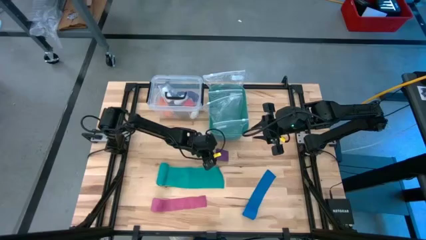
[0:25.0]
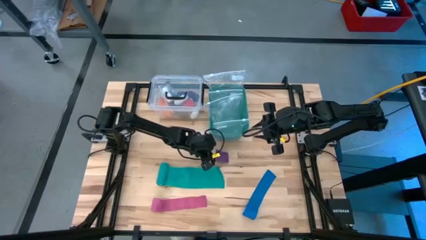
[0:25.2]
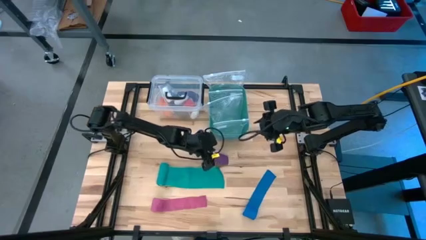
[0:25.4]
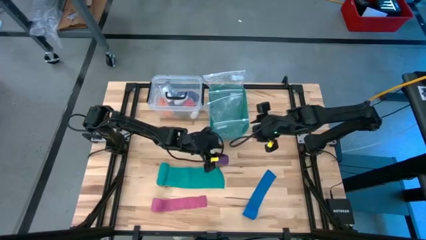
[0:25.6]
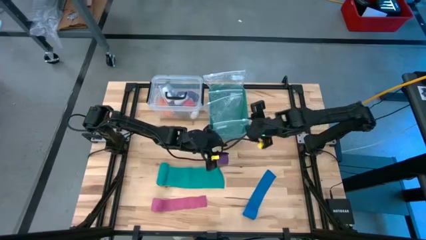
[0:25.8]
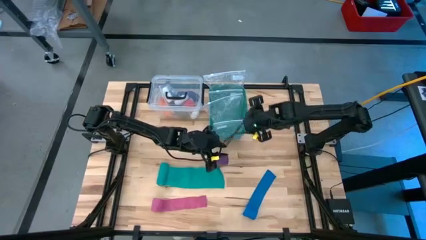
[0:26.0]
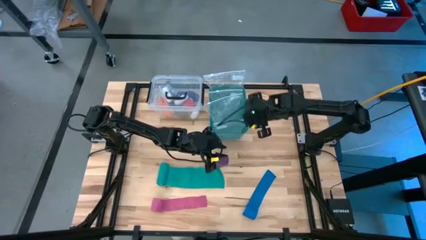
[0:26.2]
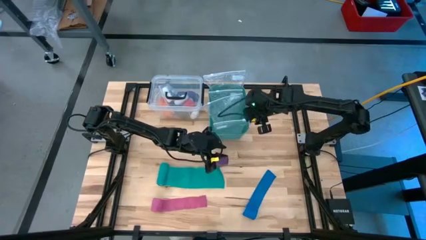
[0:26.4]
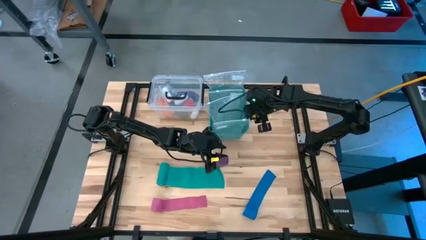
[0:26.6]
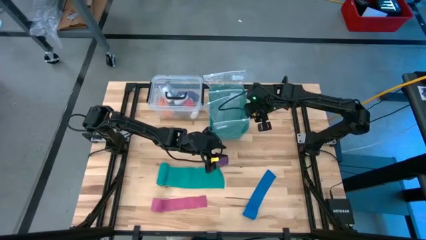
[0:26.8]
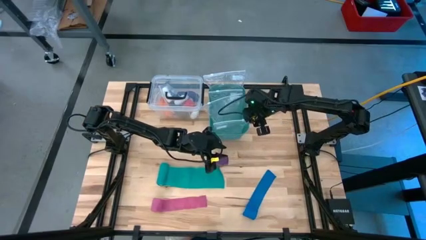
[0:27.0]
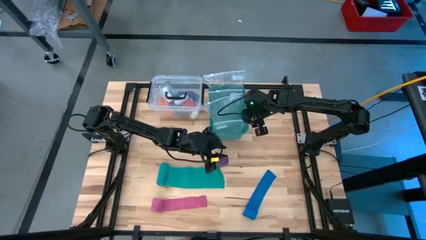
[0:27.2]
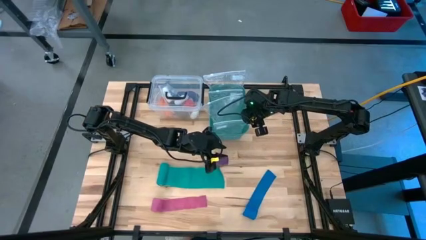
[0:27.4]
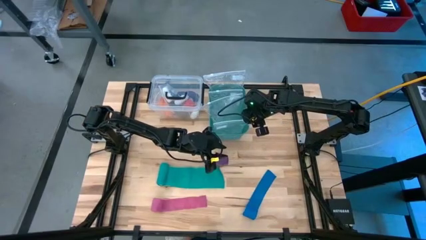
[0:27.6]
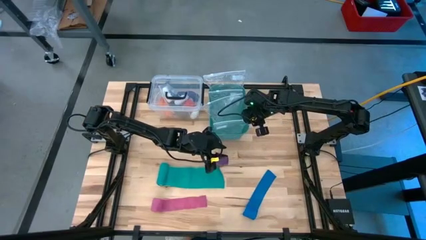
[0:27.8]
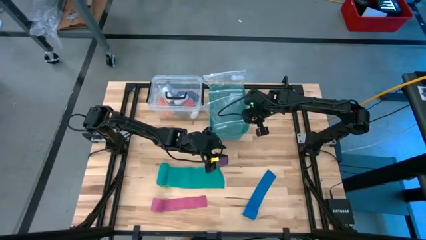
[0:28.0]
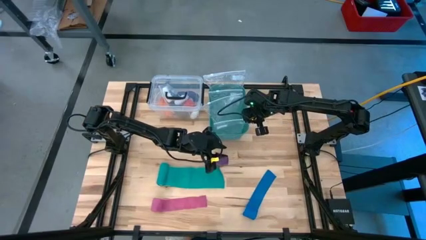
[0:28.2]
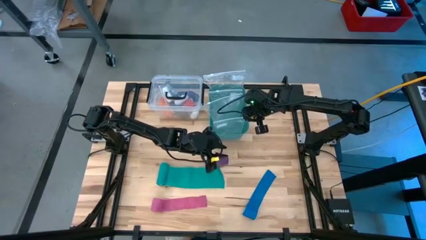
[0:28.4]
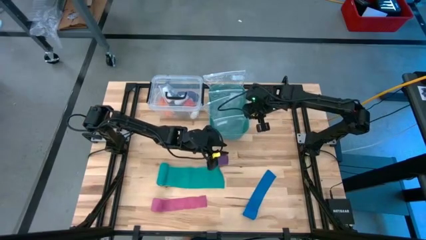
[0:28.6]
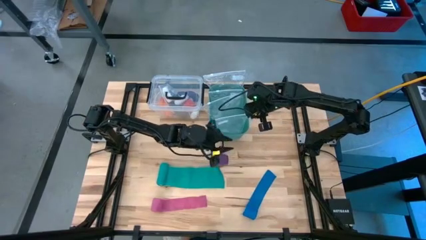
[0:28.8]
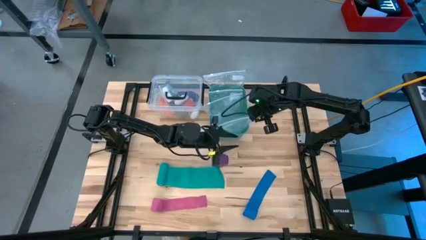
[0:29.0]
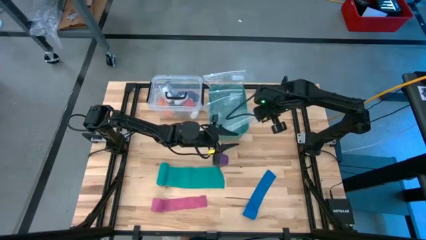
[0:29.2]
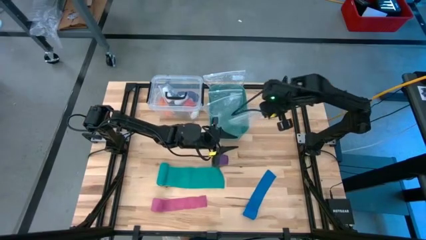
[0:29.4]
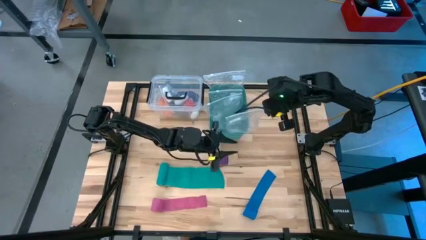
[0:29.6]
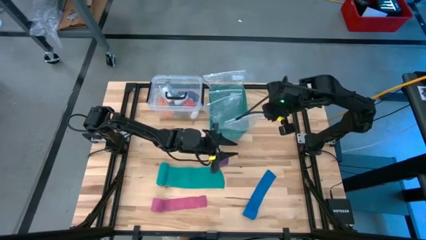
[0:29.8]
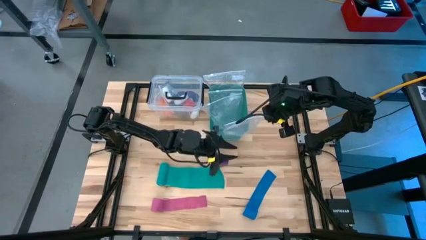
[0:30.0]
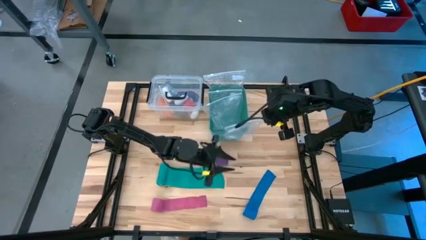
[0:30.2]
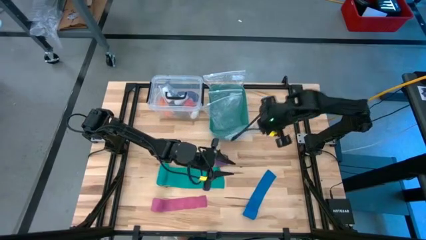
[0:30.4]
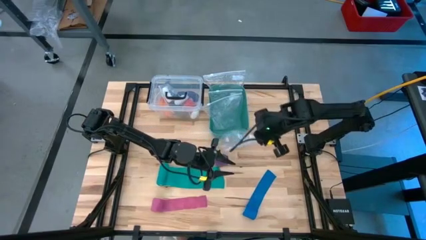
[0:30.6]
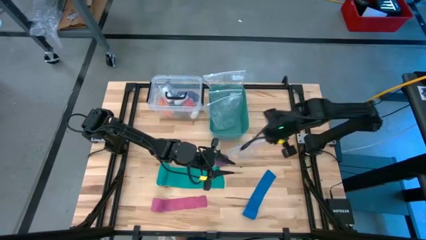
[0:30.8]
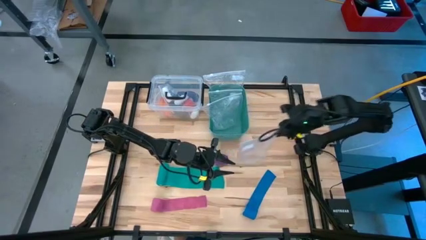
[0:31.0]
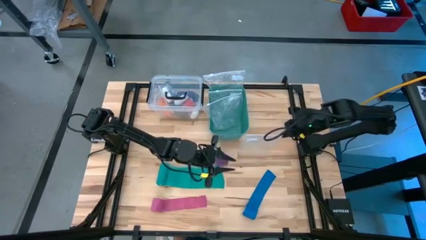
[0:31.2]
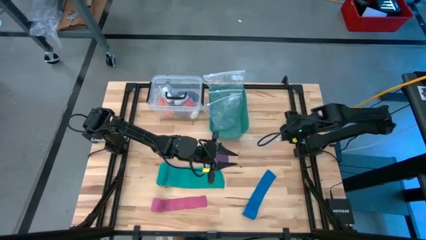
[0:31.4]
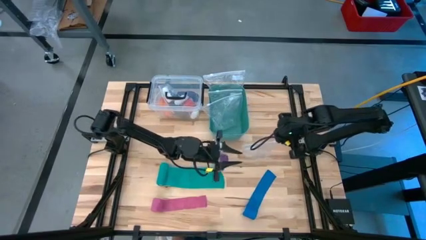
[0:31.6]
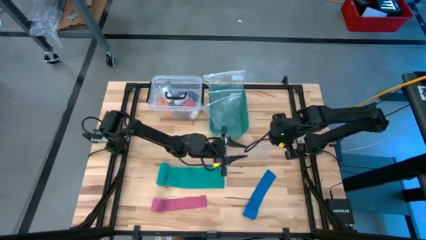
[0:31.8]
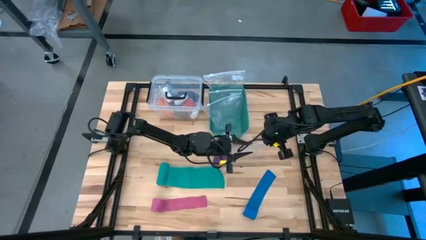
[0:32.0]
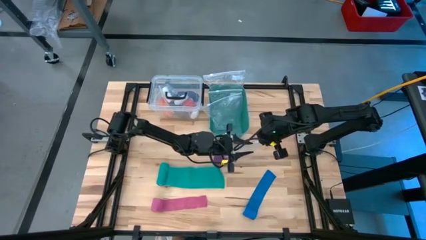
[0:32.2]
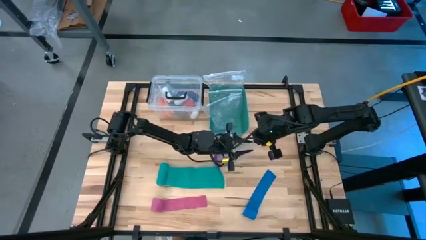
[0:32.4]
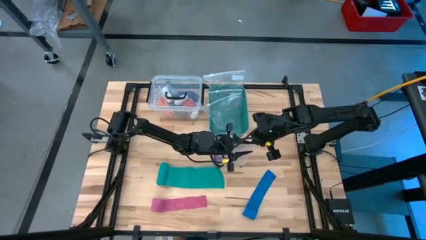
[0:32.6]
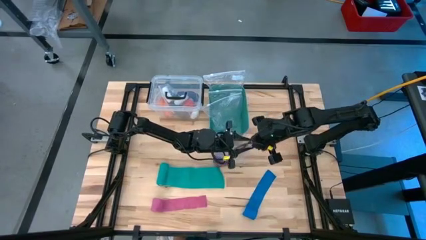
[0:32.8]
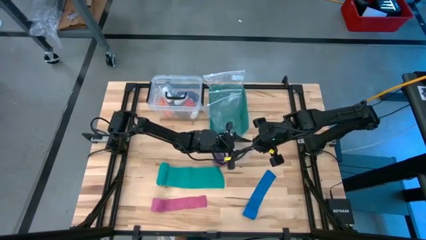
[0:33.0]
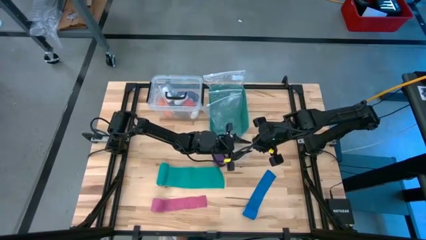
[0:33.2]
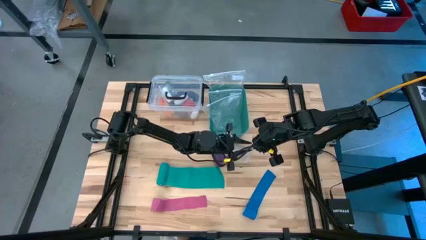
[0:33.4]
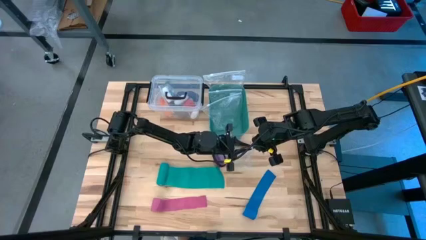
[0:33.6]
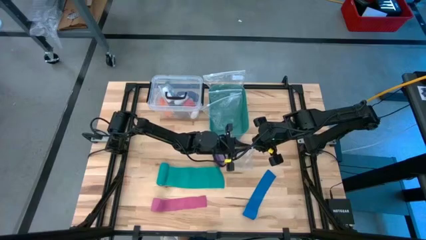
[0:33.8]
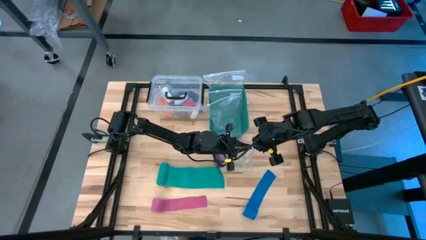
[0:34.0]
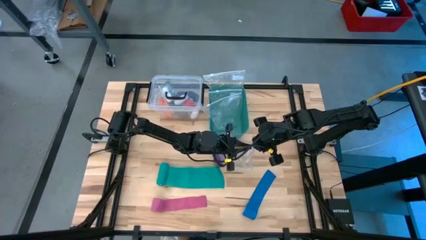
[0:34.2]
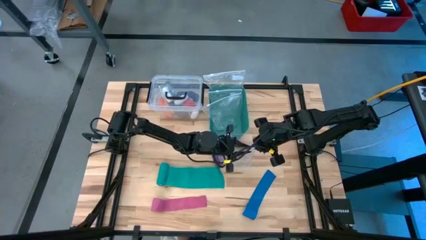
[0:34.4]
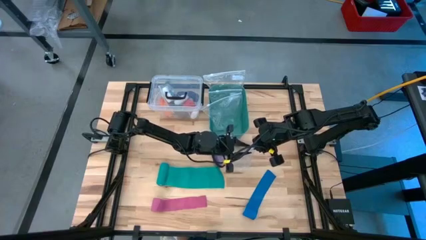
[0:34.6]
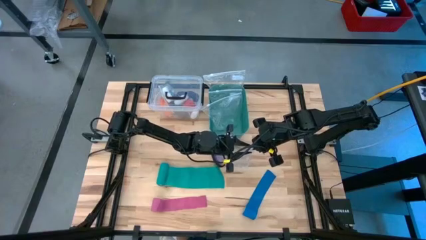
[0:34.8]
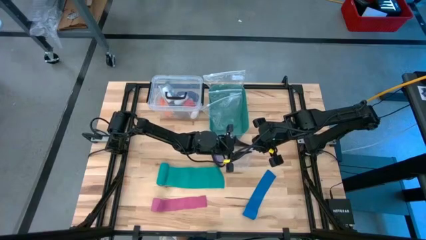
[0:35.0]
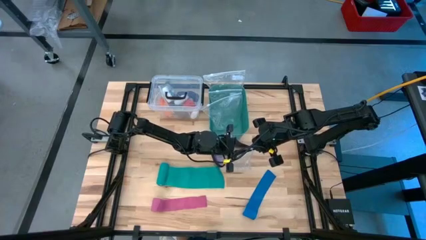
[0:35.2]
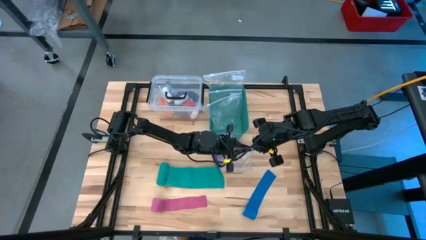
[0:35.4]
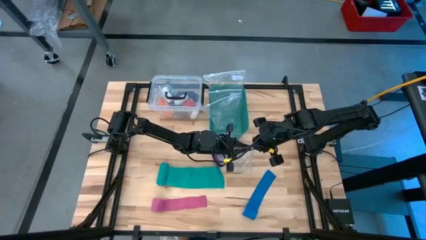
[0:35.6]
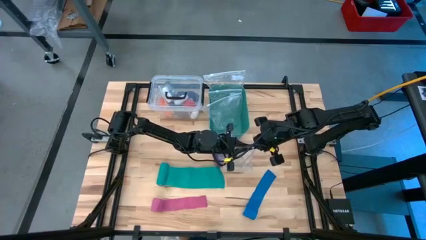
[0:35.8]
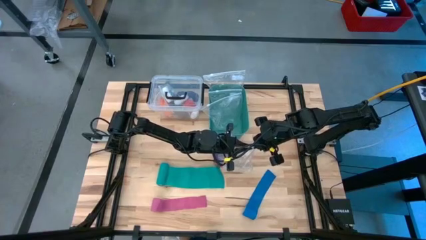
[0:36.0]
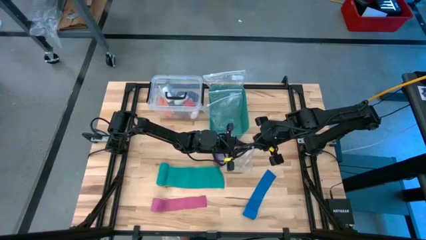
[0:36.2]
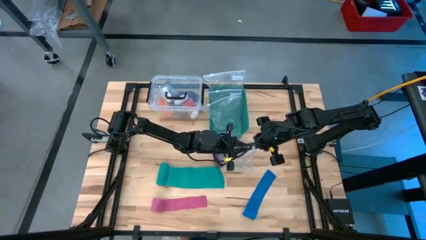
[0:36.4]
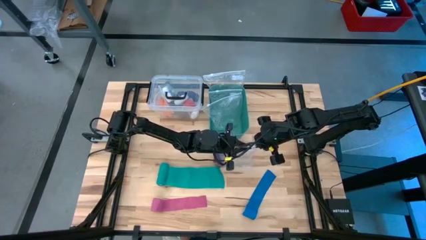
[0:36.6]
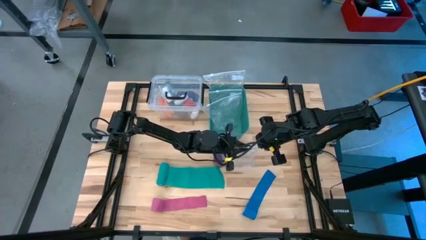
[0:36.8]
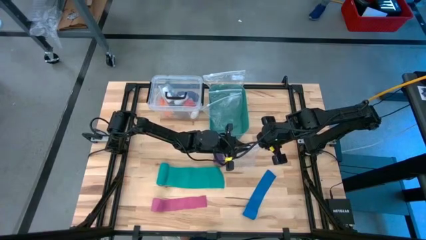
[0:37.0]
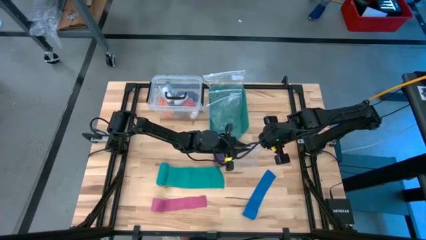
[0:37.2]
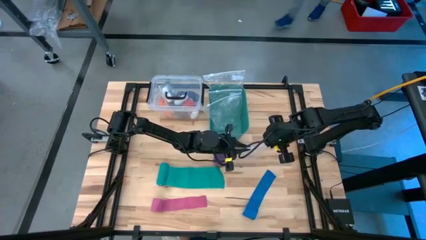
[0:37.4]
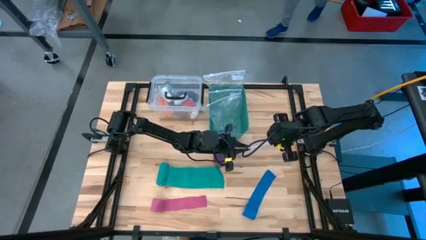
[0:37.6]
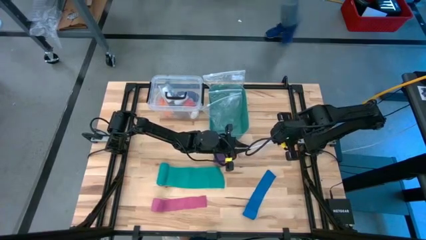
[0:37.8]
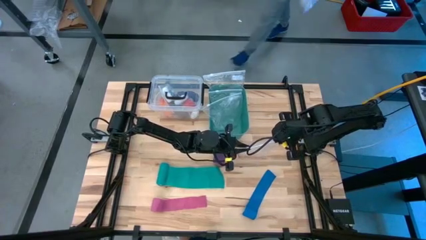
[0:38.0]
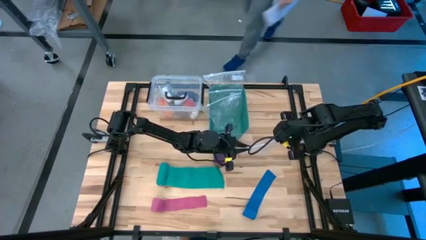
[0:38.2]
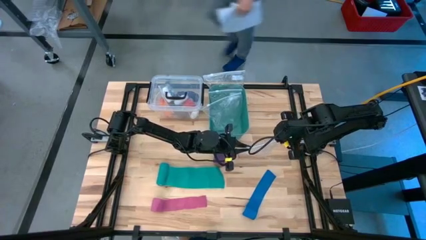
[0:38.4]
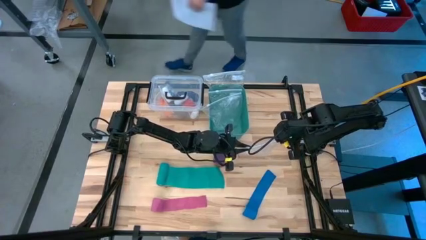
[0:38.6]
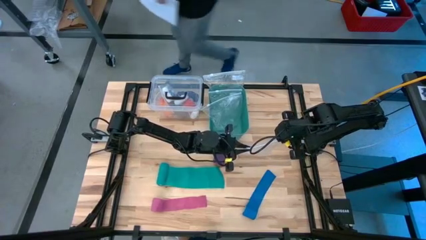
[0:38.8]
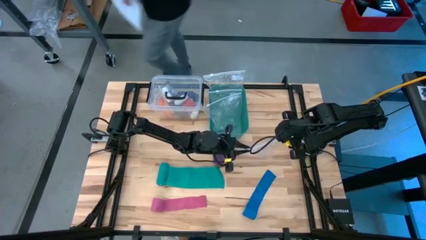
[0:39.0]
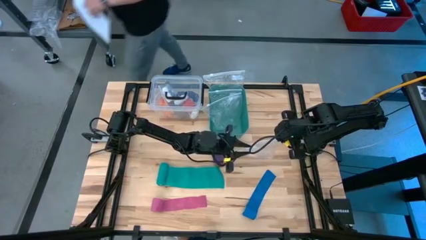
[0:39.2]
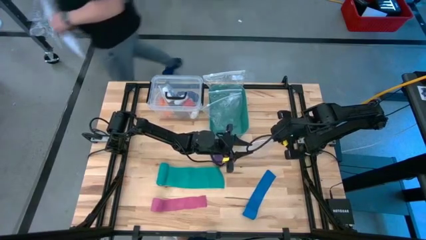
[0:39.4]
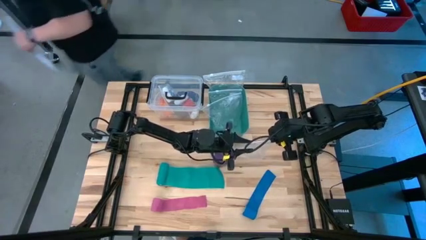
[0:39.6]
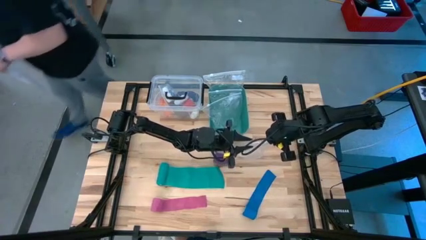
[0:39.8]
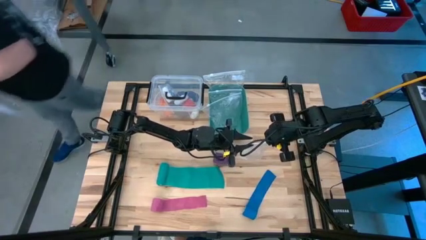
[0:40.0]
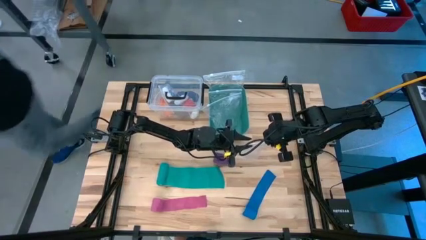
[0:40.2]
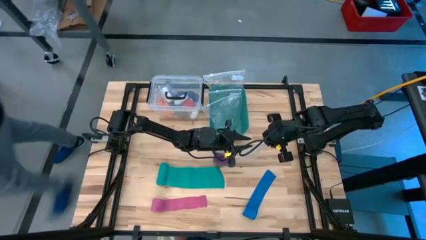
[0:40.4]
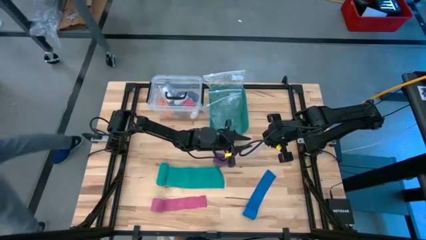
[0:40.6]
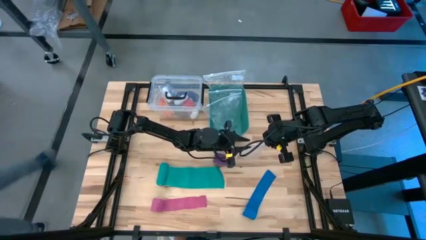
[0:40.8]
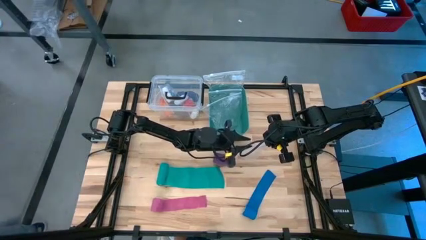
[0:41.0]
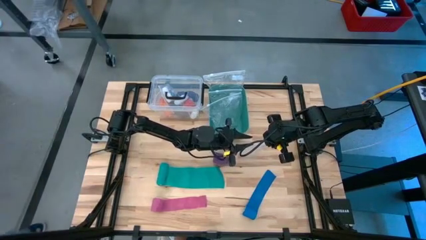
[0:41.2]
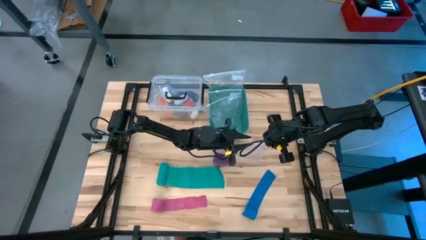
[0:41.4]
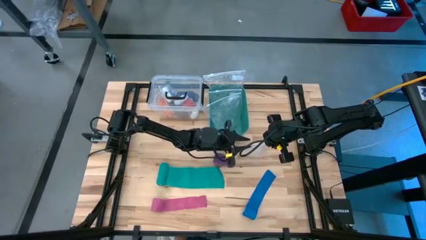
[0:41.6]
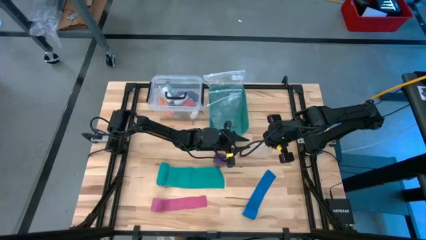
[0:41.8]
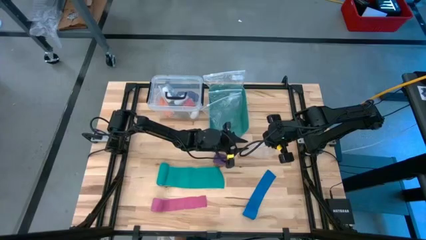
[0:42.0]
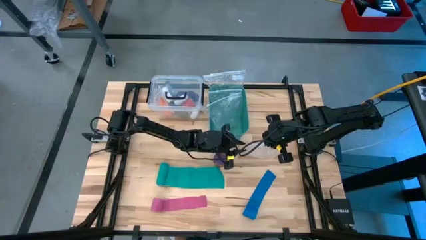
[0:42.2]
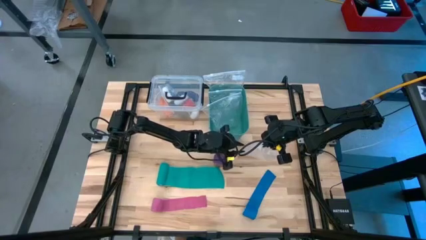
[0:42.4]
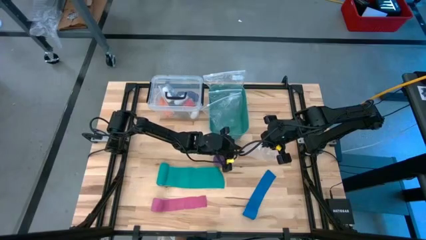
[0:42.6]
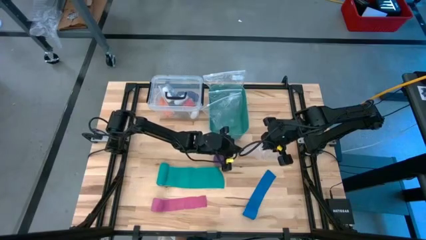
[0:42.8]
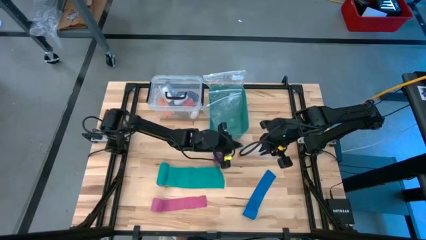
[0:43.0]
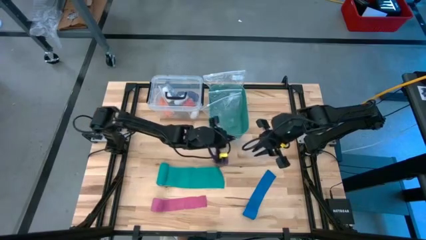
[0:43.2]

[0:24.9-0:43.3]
Task: Roll bandage
Open the bottom transparent zip bag
